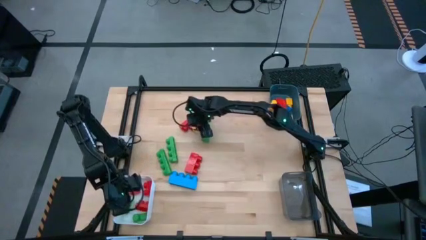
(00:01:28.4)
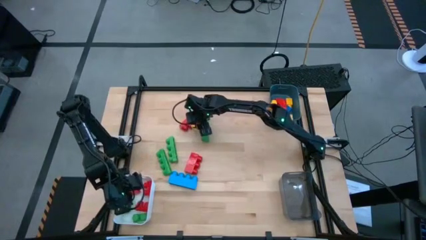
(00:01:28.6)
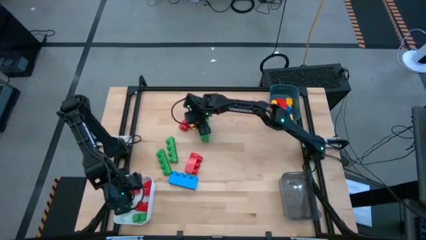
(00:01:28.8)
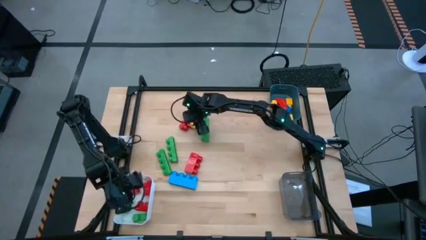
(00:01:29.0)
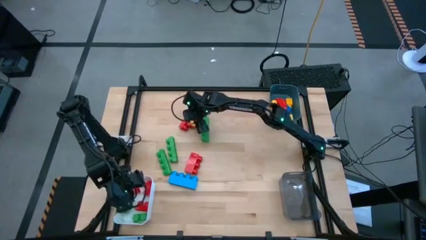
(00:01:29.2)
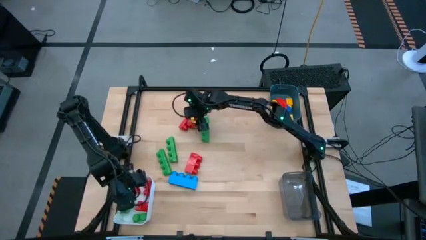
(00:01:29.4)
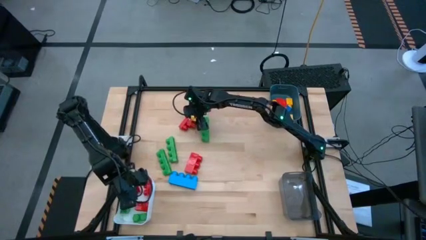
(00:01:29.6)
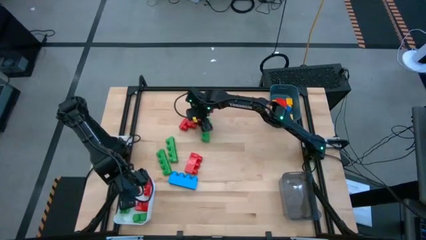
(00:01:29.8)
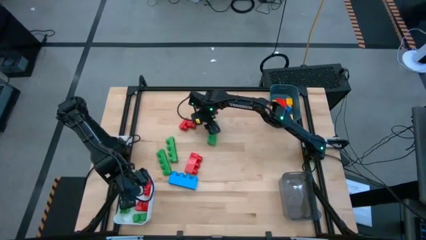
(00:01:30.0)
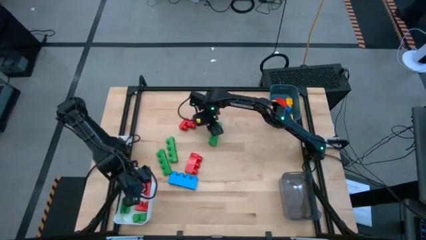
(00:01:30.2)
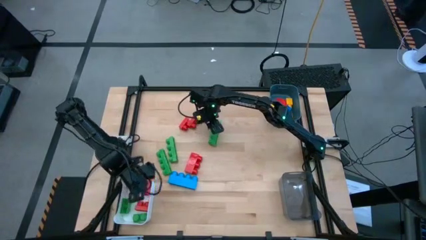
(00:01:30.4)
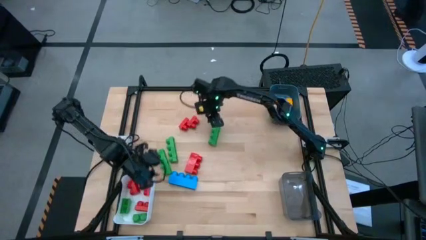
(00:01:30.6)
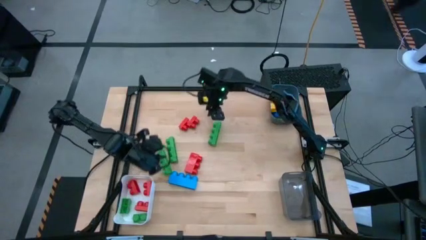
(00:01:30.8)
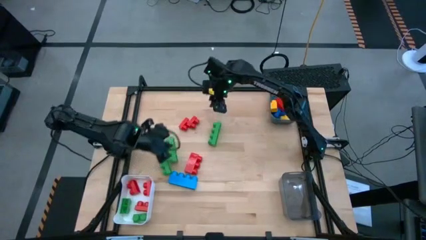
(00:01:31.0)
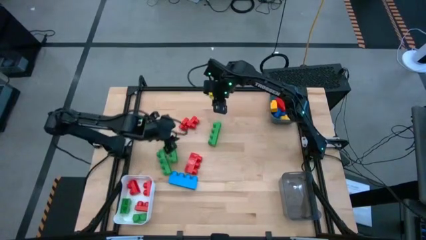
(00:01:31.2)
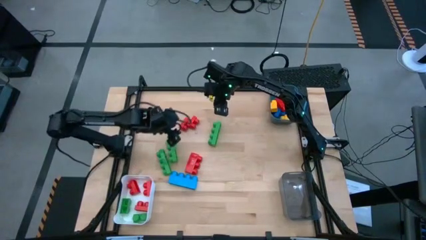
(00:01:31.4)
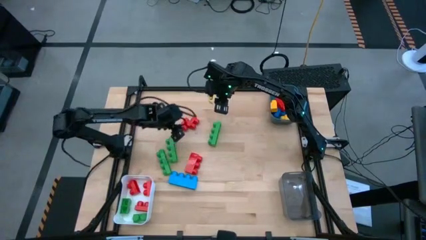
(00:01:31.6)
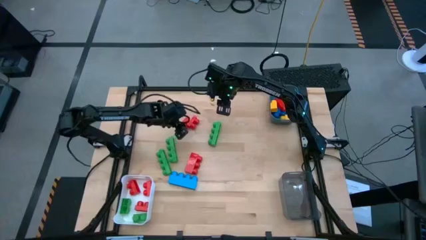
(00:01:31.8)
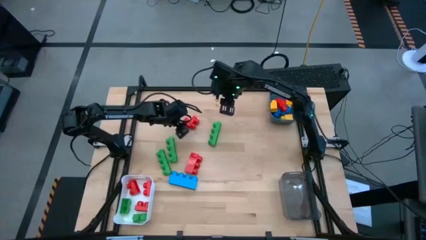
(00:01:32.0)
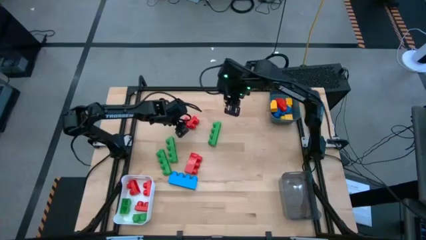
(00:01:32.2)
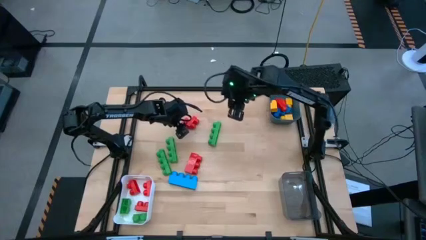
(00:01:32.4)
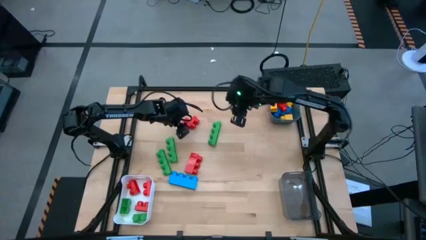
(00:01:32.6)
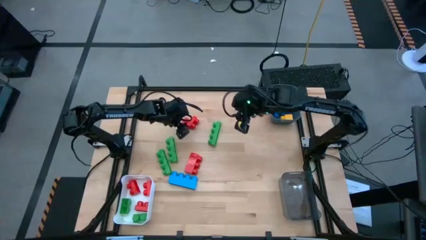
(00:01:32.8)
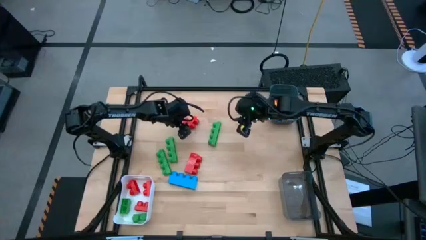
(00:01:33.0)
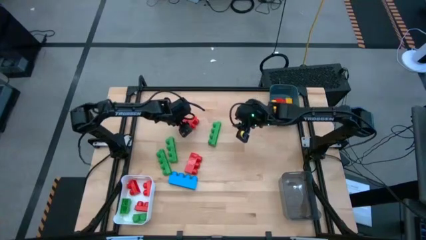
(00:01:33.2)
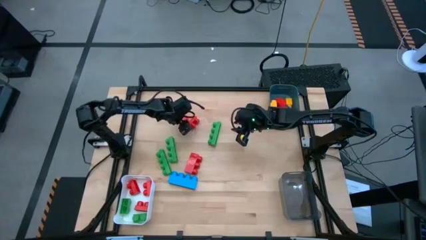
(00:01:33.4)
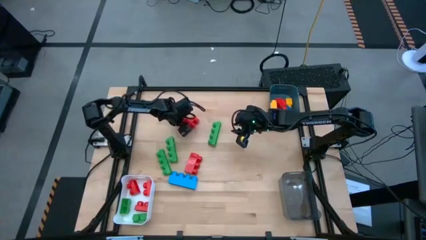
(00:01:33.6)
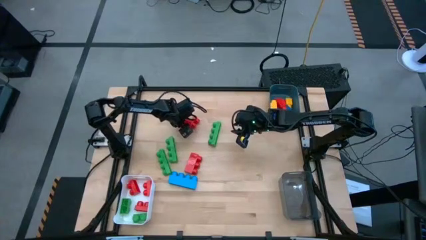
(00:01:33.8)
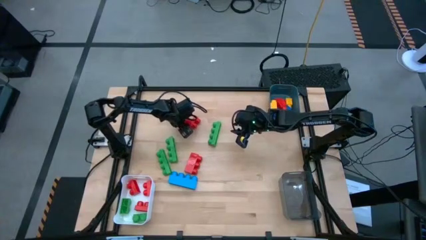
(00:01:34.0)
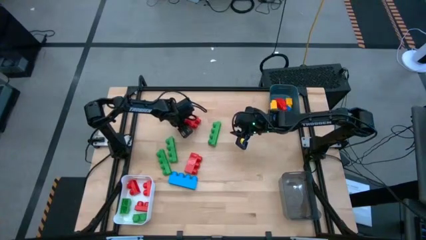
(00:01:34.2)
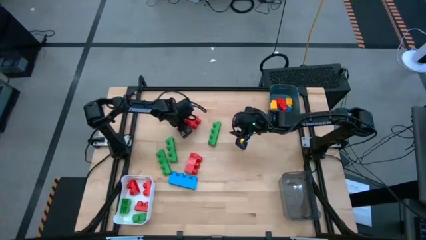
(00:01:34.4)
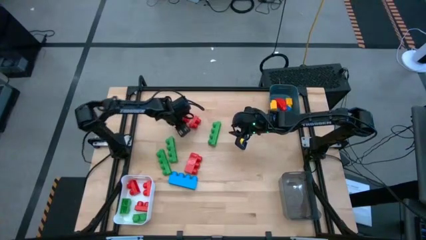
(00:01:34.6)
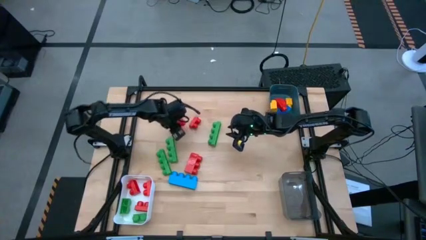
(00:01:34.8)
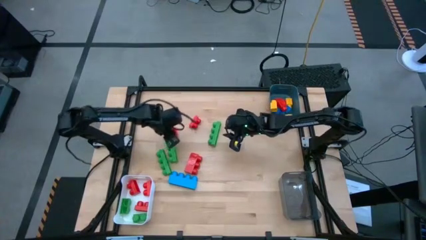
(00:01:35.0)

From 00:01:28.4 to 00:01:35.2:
Task: Sort blocks by size
Put the two stud red game piece into the white bin

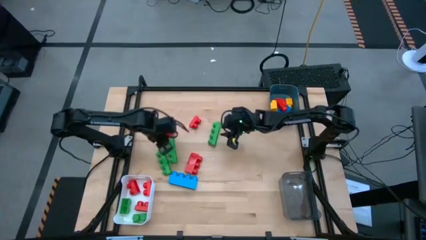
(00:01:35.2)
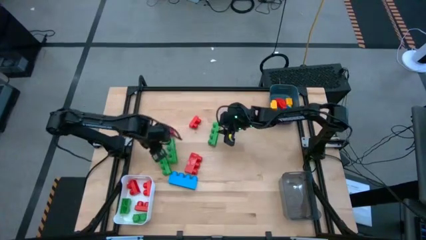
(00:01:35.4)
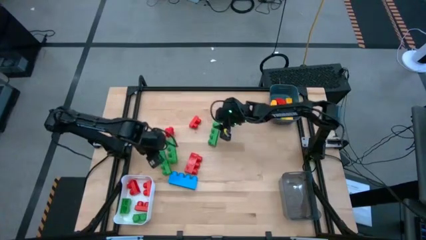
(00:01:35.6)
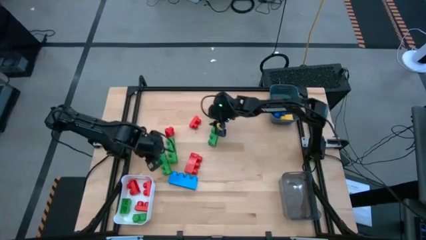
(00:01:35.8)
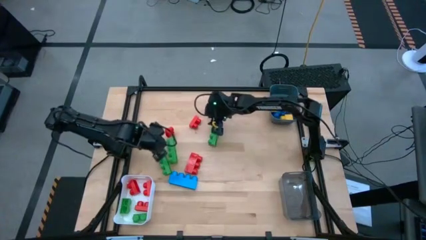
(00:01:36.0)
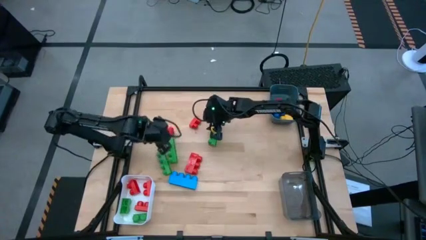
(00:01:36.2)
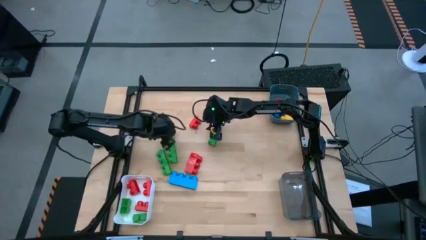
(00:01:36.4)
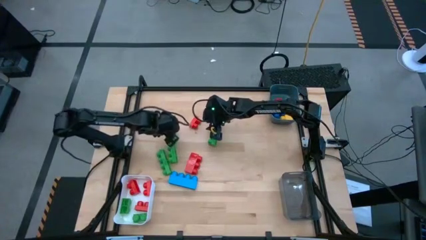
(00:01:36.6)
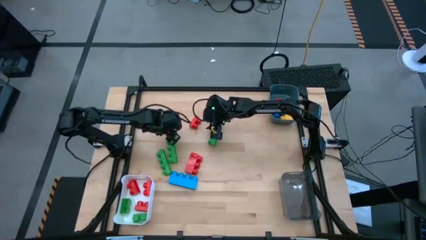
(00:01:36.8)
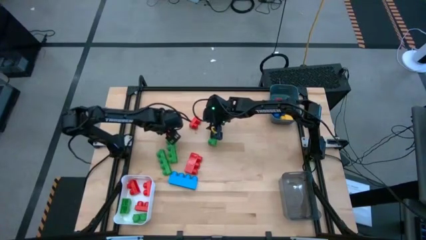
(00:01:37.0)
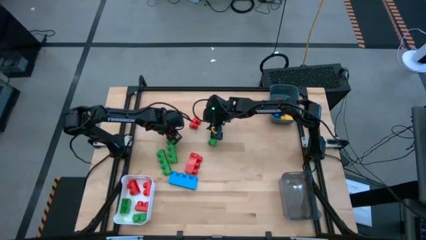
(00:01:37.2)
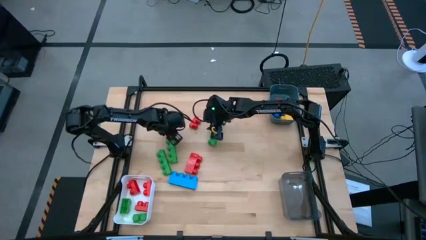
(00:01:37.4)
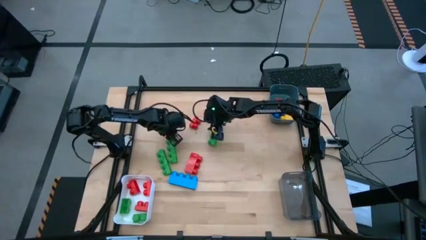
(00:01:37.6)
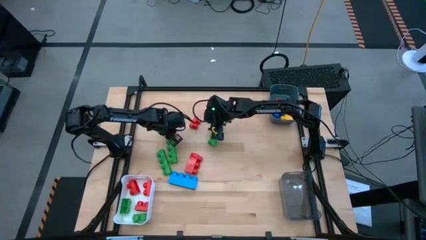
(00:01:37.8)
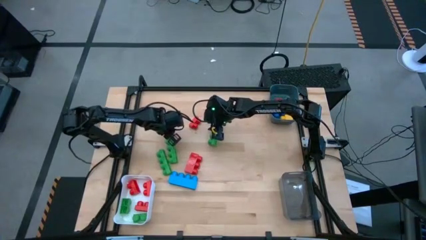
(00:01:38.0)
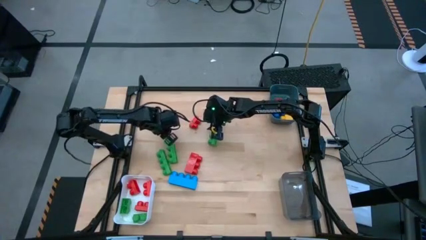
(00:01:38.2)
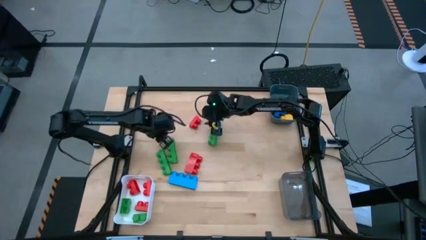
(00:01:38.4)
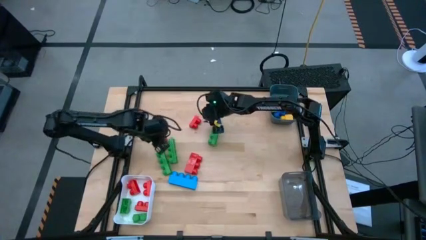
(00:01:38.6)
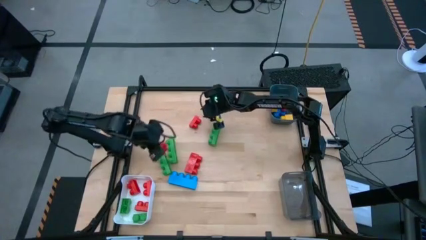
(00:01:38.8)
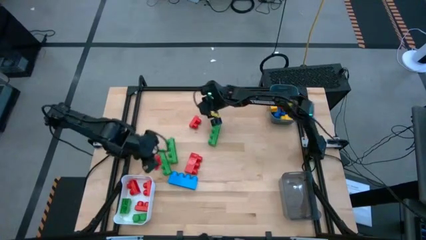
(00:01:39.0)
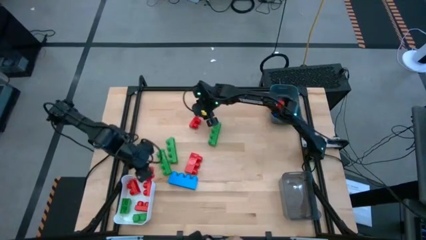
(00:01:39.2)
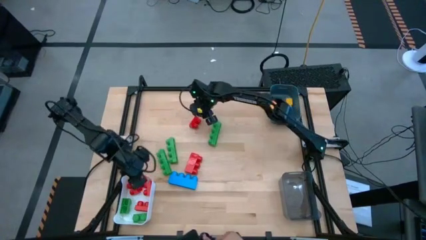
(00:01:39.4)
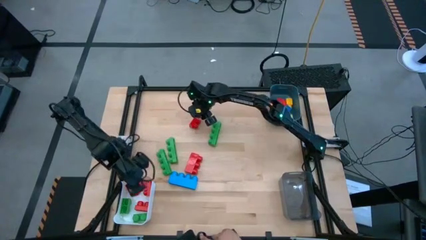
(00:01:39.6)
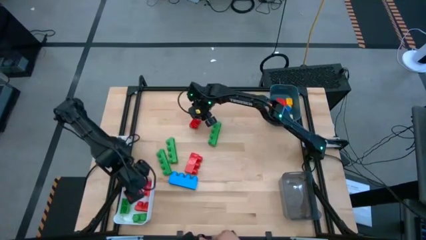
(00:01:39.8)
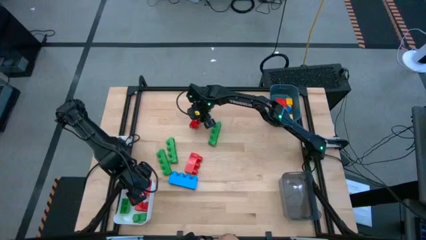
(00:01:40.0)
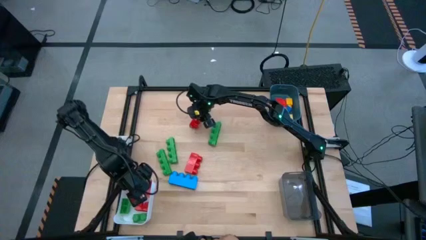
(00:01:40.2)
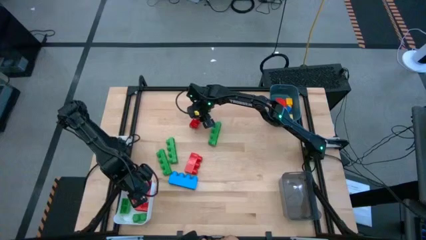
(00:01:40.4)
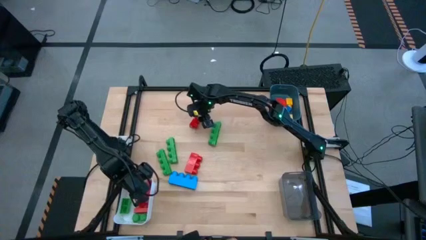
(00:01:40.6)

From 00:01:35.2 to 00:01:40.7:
Put the two stud red game piece into the white bin
